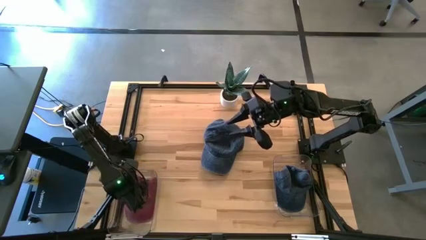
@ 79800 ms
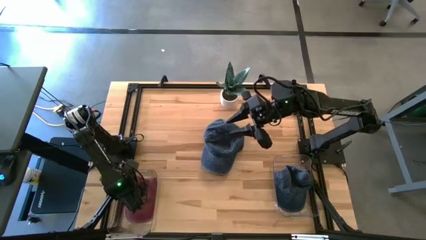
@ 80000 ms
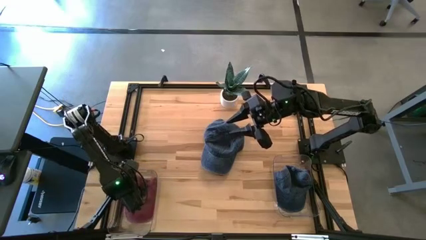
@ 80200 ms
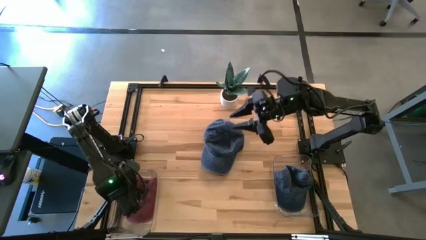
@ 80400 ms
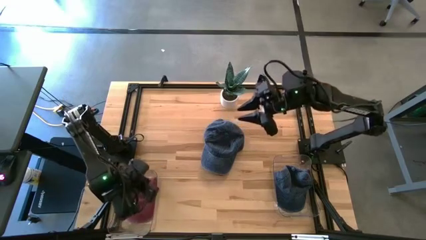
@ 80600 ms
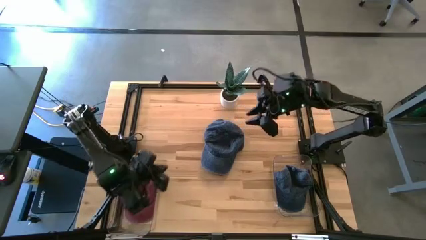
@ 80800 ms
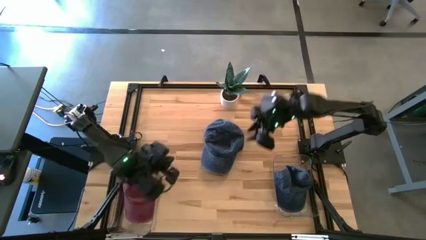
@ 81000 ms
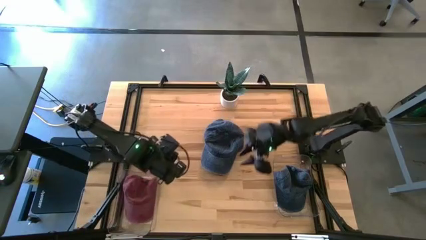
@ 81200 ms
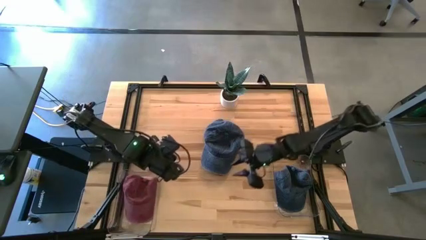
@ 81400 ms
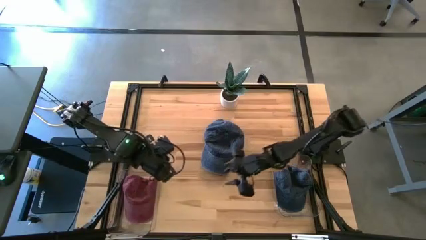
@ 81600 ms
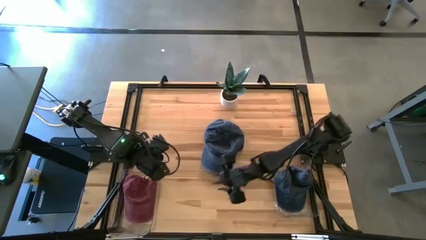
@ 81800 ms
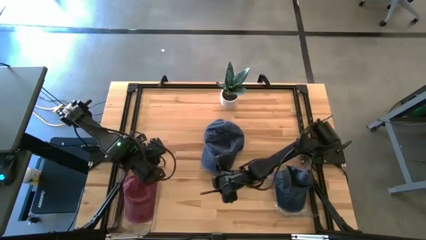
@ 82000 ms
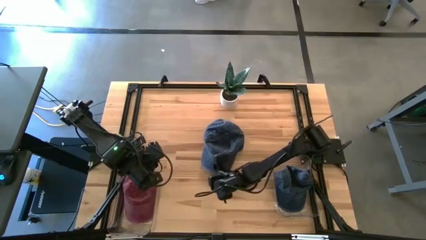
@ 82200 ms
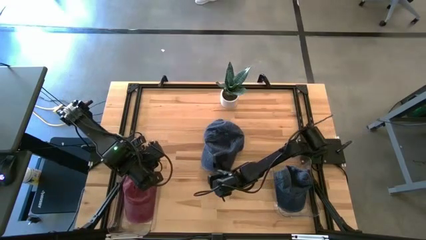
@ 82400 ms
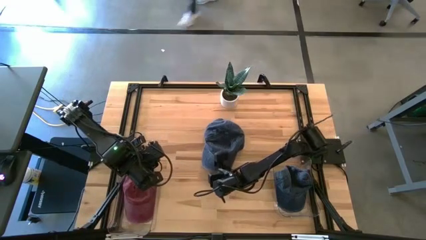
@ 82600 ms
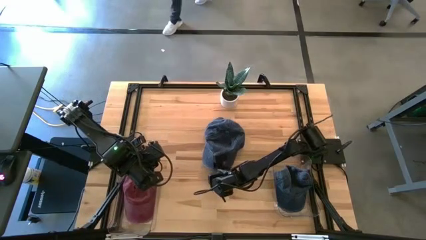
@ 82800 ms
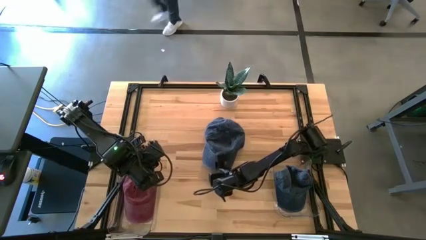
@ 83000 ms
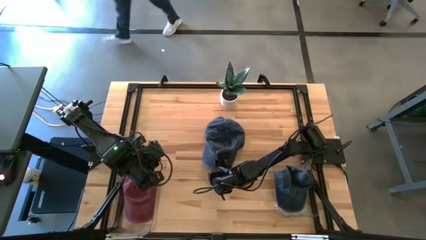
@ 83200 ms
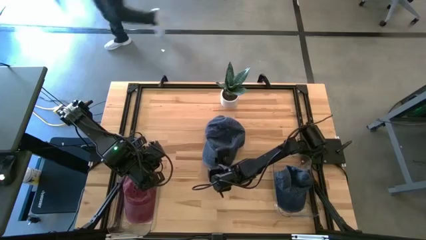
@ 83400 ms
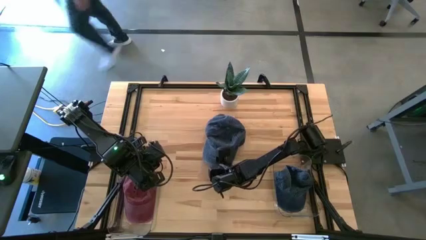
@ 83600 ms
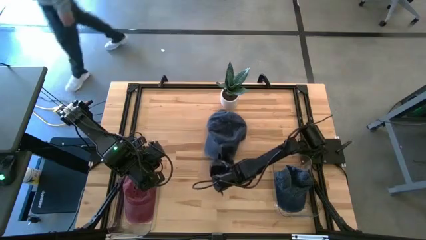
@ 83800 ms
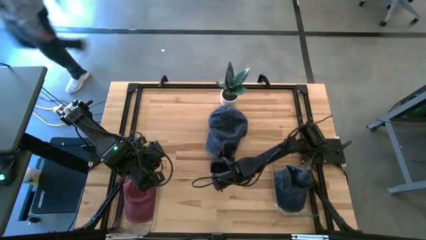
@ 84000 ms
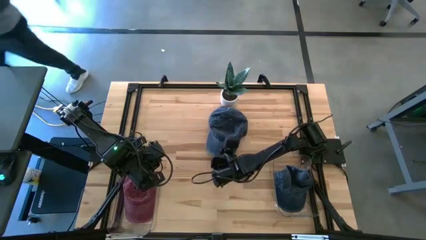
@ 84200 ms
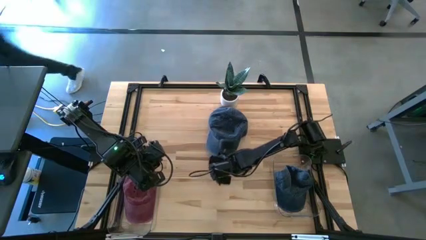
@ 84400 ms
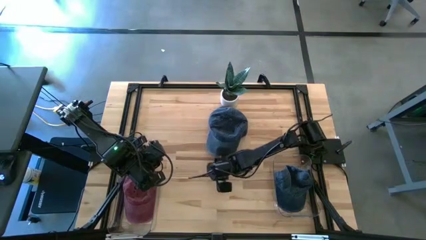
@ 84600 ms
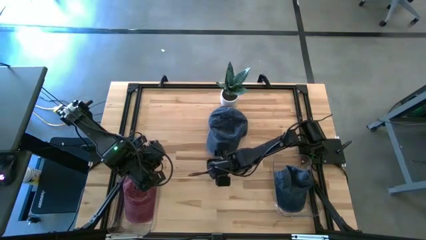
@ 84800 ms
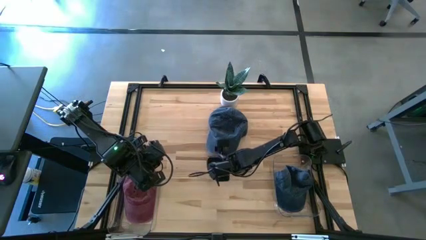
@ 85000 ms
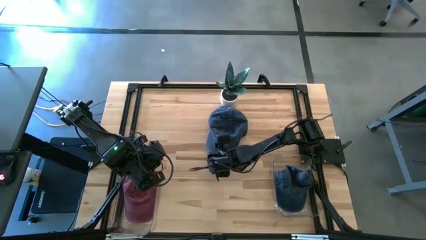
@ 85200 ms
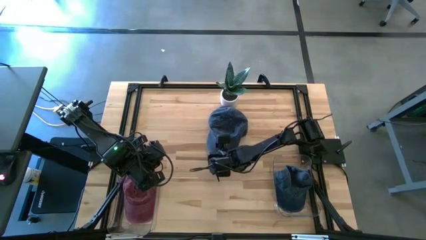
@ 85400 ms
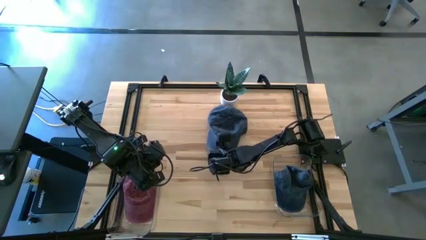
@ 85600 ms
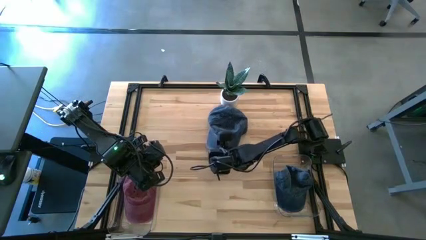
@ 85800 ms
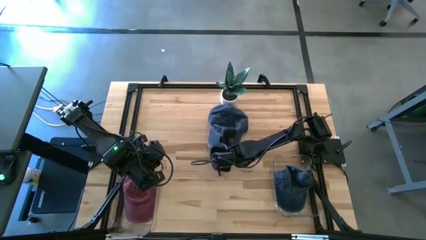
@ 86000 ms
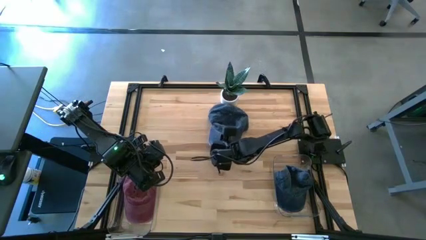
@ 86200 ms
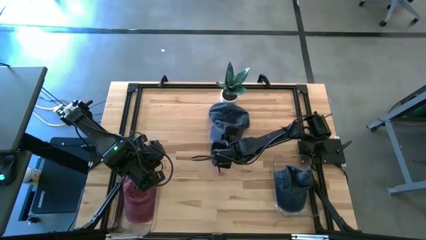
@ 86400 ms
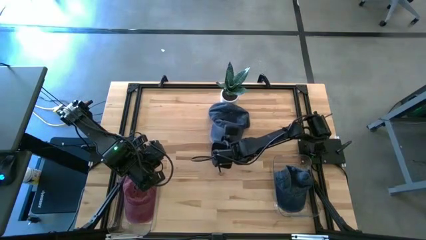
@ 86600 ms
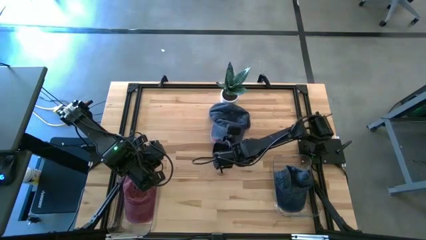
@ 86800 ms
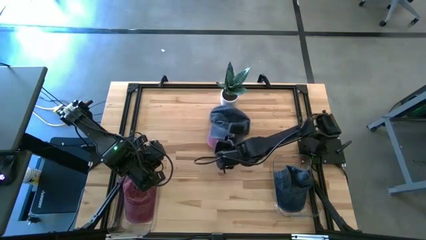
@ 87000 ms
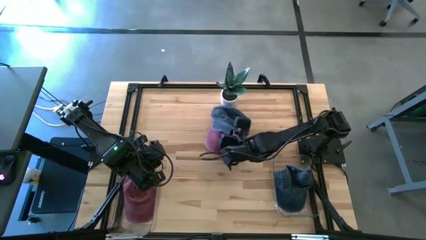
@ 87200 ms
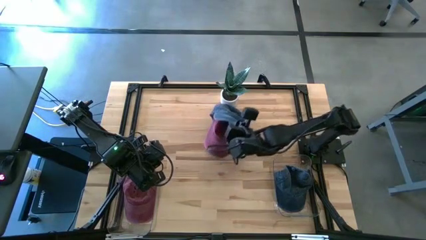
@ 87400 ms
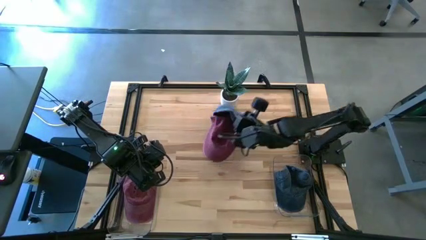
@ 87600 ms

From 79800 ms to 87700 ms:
Task: Pick & Place hat
Put the blue cap into the right transparent bin
